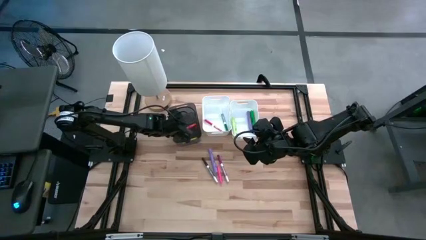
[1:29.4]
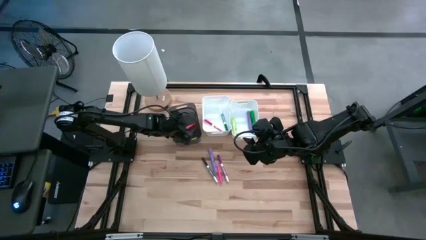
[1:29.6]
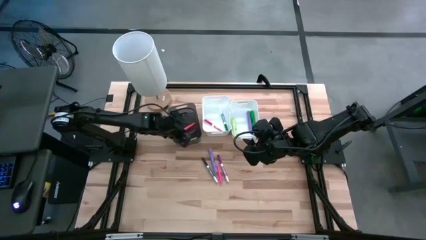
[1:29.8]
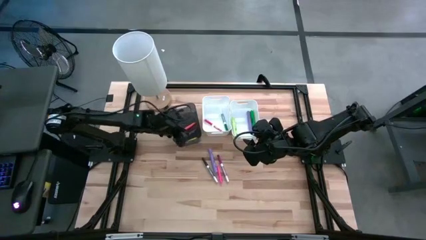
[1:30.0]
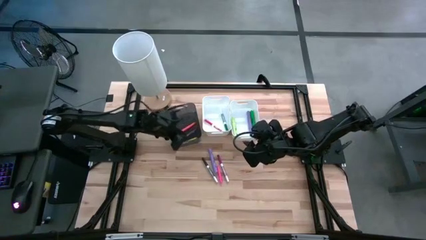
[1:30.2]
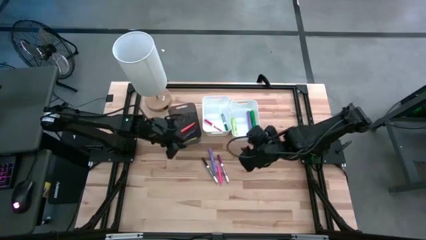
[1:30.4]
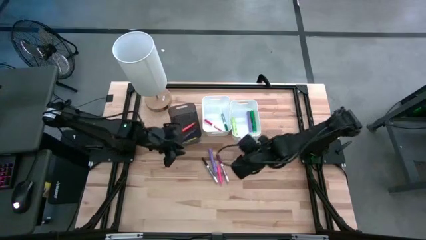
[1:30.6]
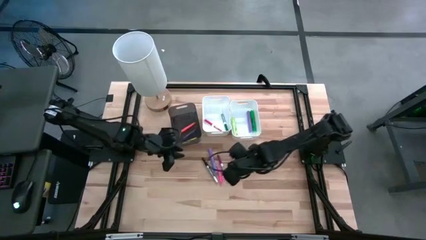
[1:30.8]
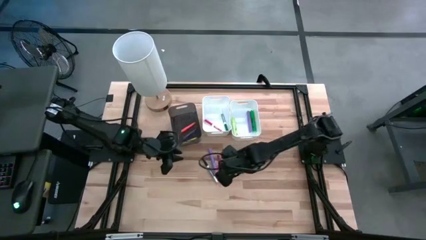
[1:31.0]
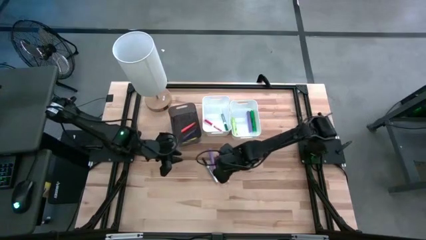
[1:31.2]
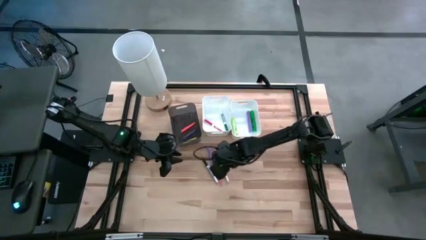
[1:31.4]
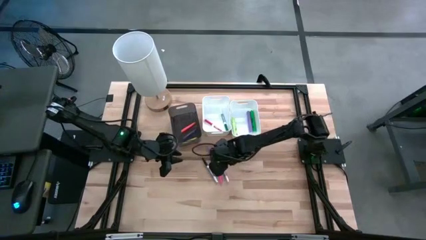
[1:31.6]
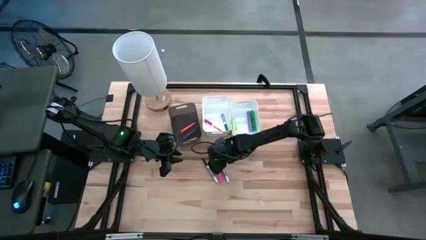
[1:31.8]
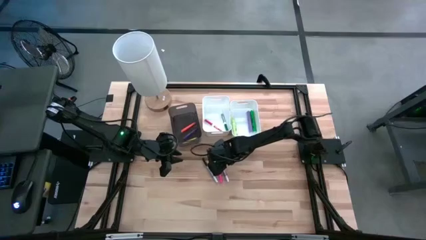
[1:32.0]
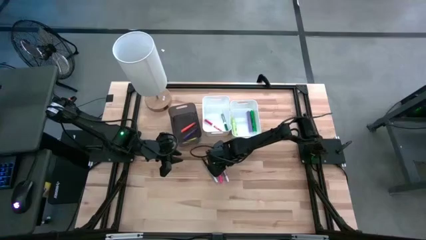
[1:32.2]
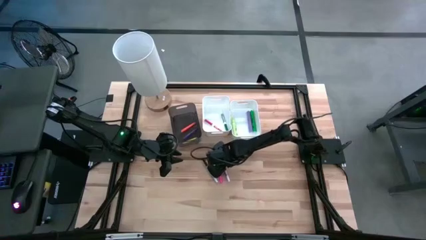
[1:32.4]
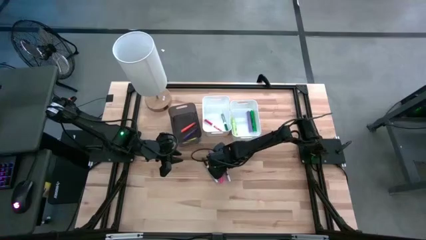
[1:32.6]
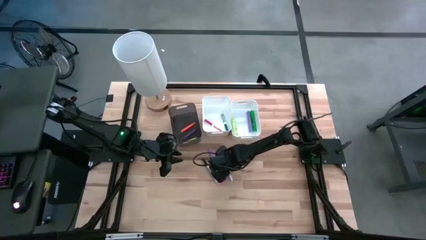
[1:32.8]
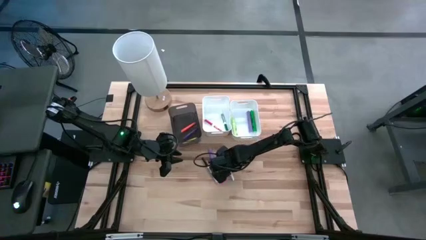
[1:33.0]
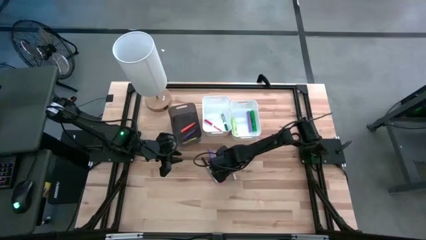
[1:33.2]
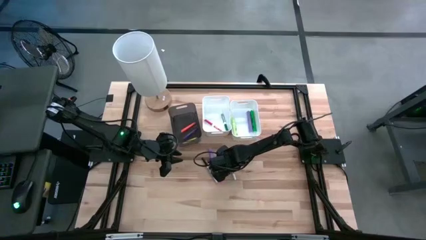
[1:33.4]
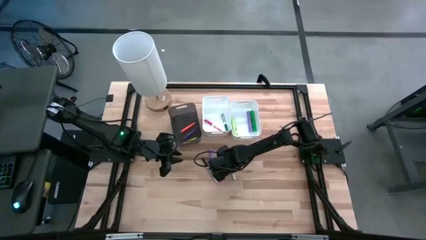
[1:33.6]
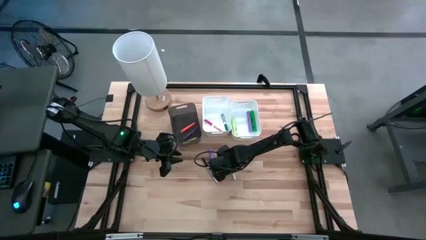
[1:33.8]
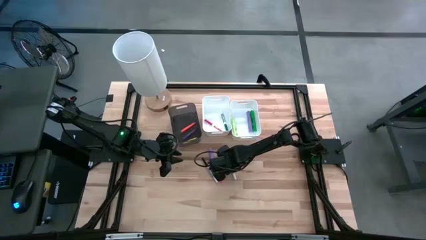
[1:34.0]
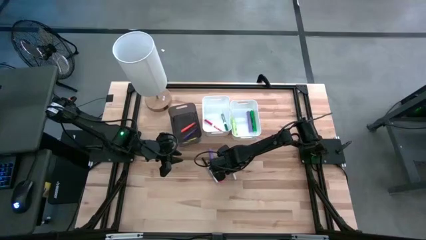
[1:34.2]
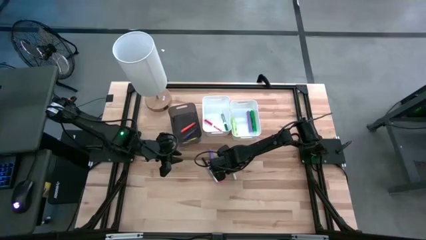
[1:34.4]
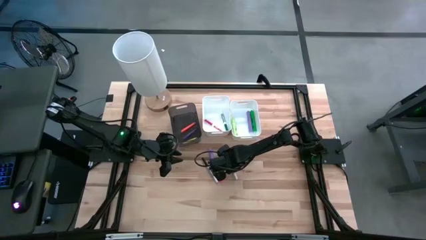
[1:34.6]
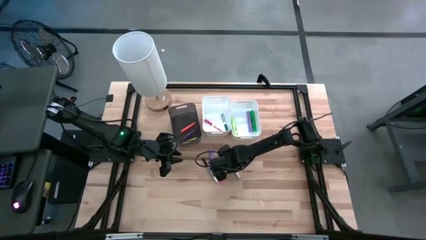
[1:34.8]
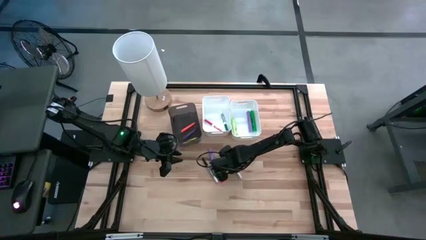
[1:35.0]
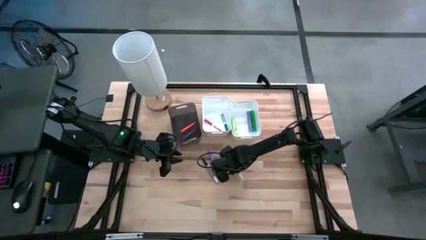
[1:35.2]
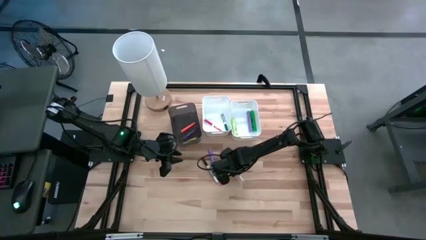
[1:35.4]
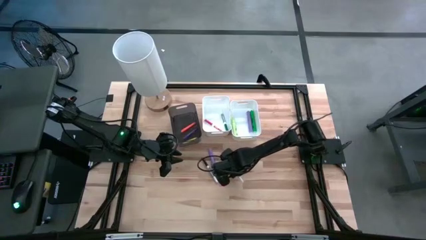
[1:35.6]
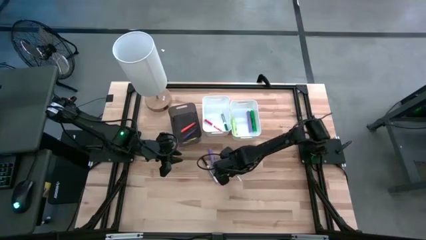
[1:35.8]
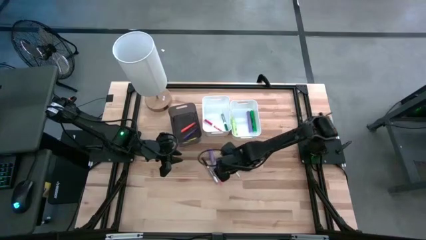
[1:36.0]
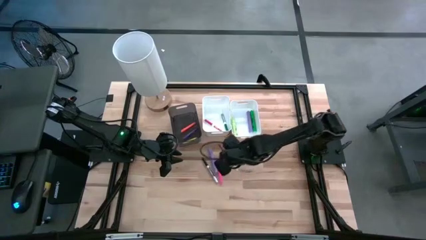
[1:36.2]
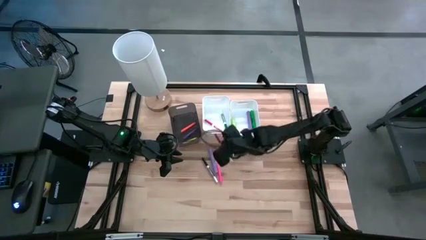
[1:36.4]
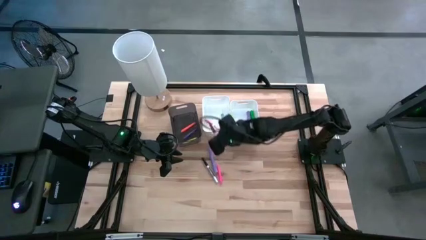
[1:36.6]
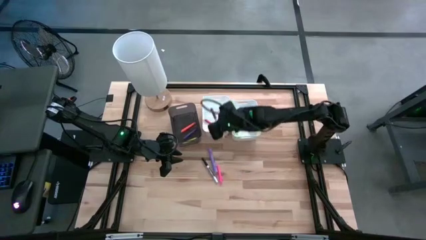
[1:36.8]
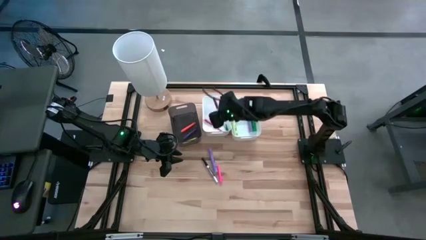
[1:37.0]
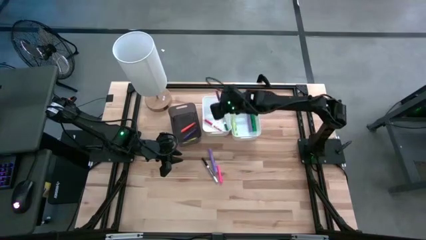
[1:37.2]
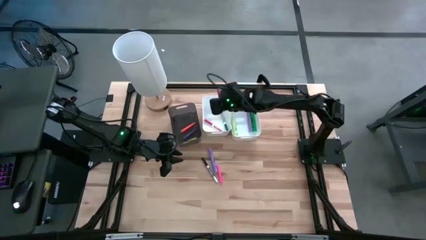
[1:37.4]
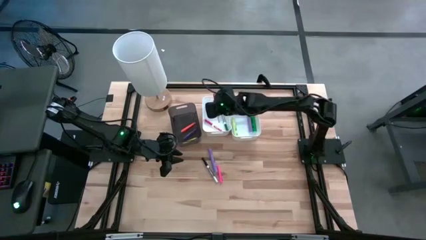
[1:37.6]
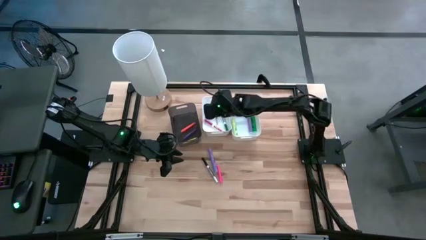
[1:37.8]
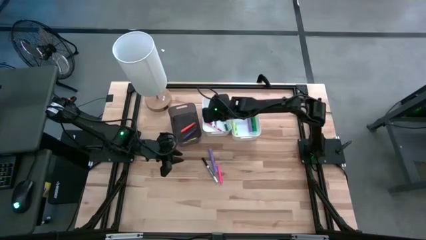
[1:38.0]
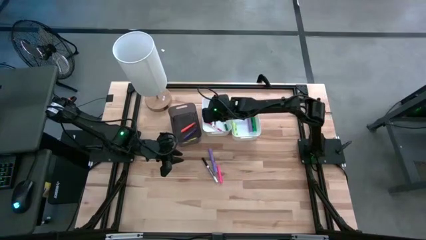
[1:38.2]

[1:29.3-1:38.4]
Task: Pick & Place Markers
Put the dark pink marker pen into the left white bin

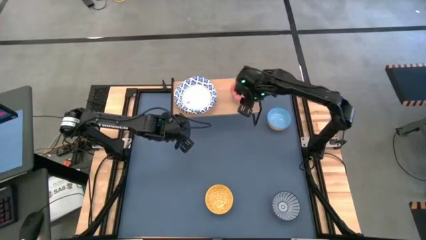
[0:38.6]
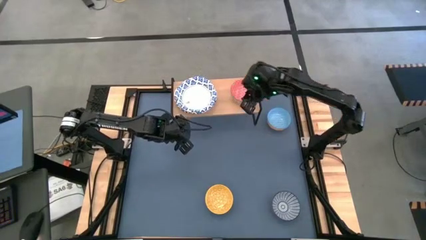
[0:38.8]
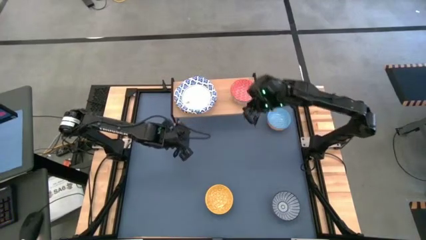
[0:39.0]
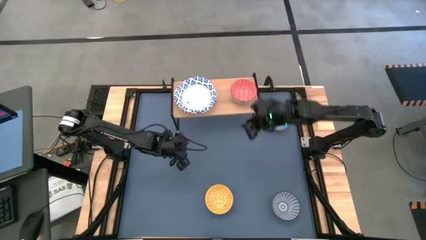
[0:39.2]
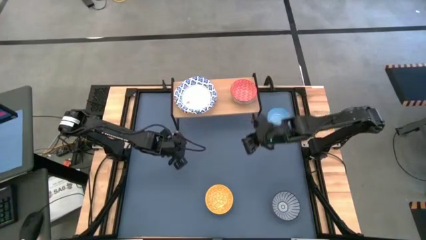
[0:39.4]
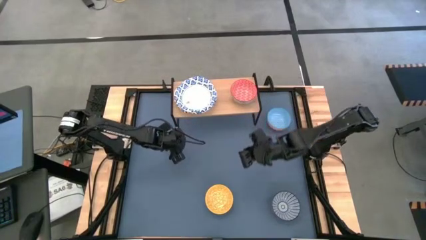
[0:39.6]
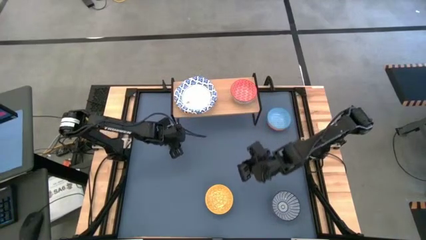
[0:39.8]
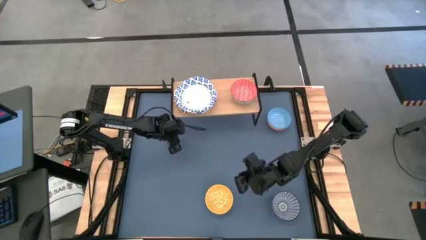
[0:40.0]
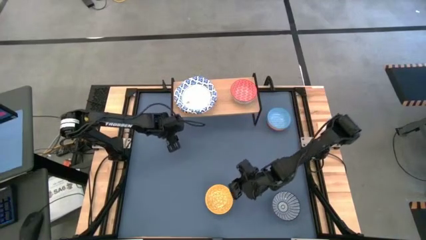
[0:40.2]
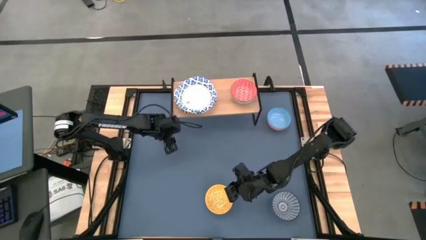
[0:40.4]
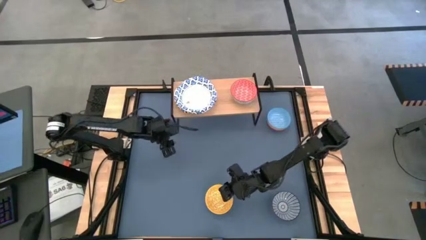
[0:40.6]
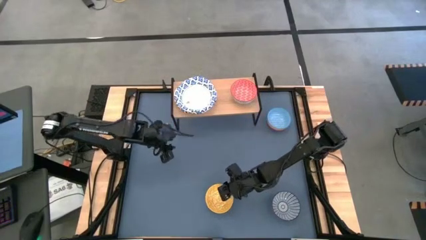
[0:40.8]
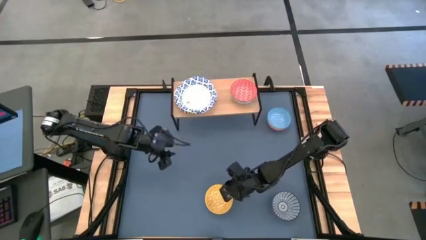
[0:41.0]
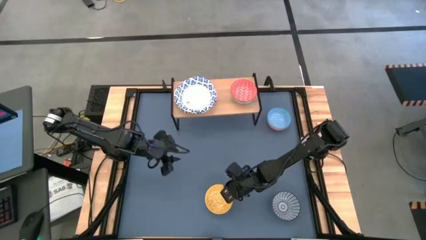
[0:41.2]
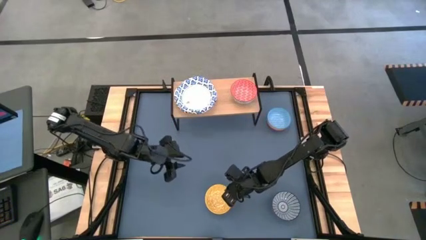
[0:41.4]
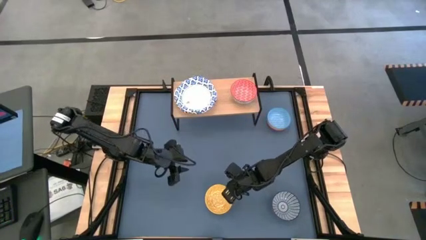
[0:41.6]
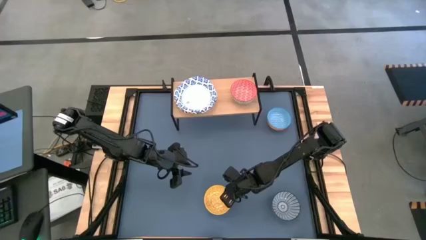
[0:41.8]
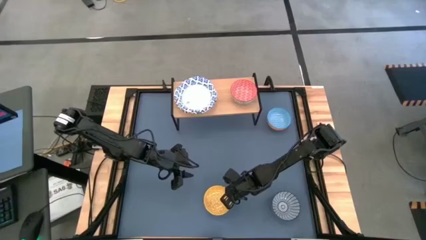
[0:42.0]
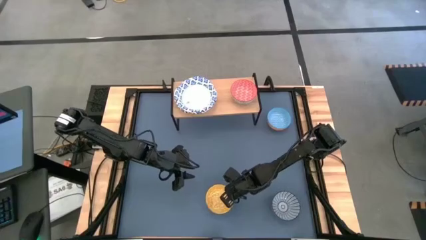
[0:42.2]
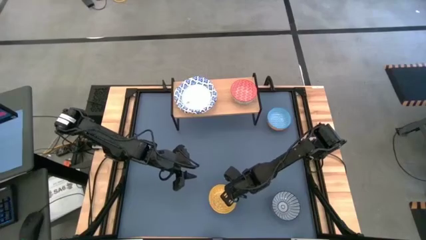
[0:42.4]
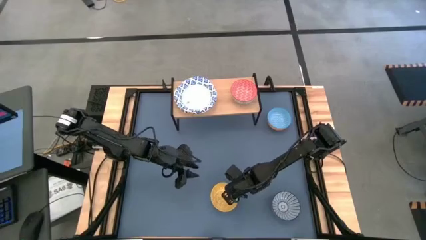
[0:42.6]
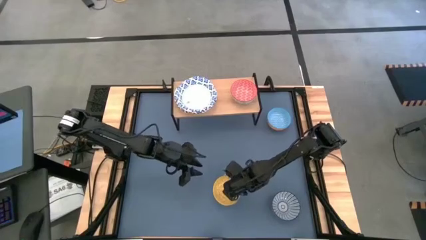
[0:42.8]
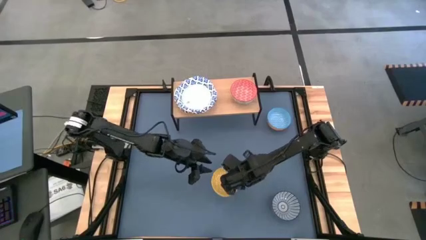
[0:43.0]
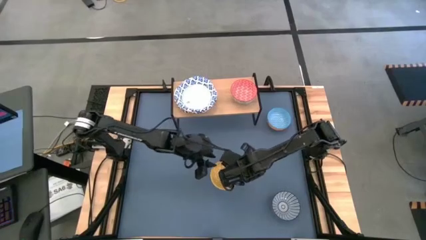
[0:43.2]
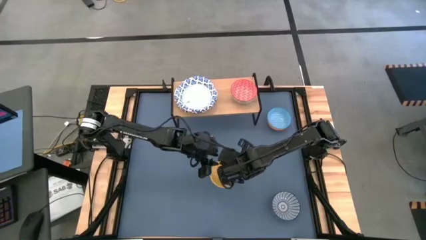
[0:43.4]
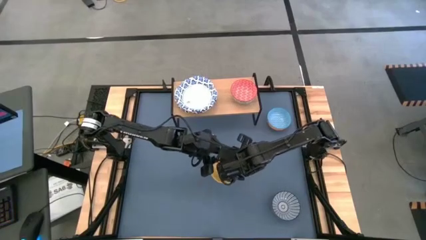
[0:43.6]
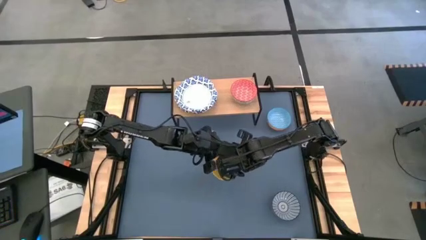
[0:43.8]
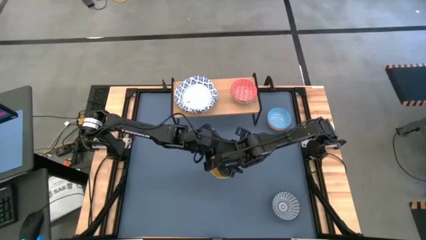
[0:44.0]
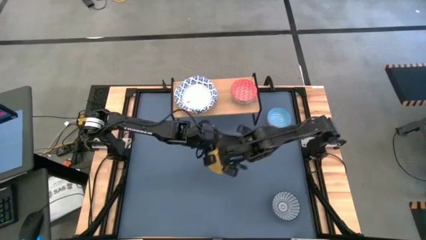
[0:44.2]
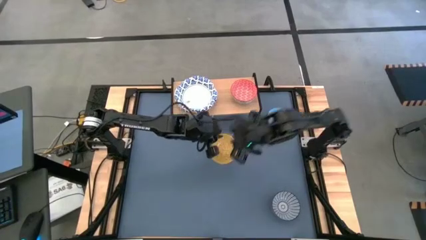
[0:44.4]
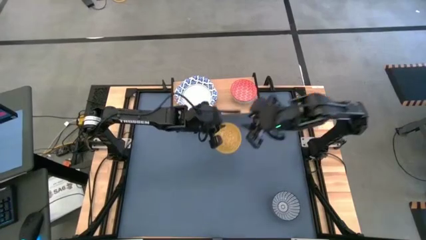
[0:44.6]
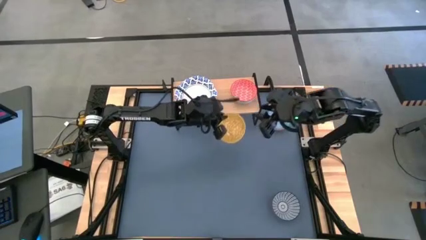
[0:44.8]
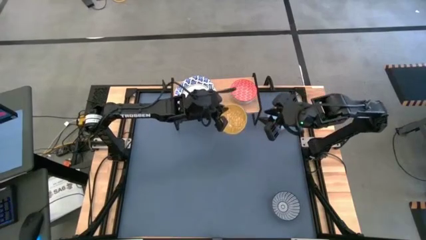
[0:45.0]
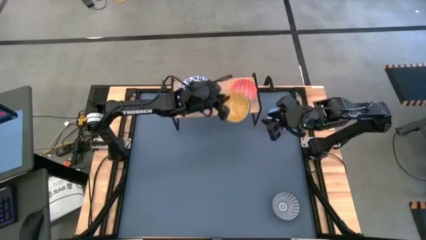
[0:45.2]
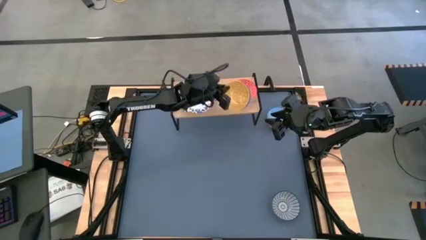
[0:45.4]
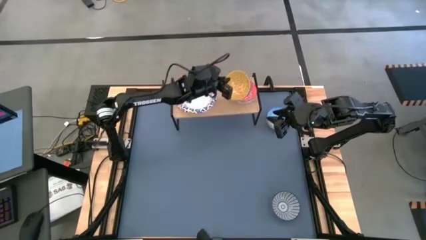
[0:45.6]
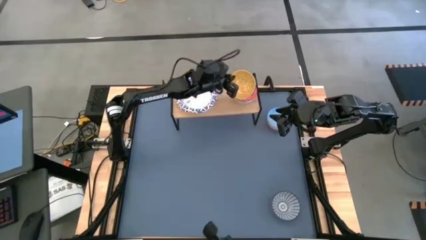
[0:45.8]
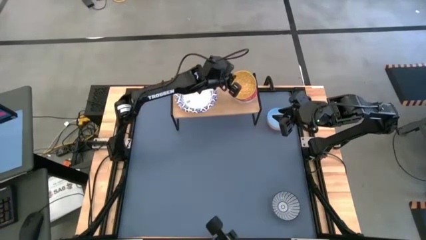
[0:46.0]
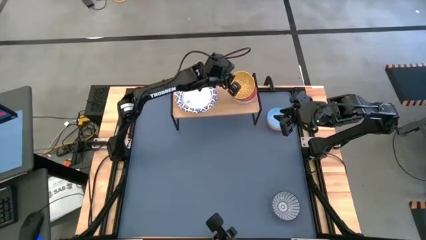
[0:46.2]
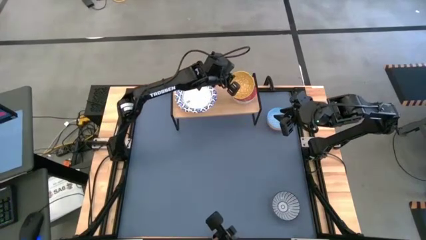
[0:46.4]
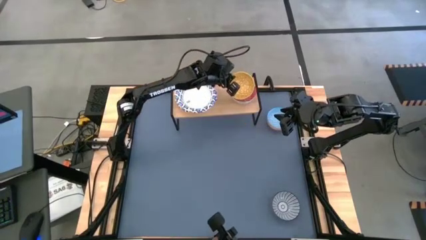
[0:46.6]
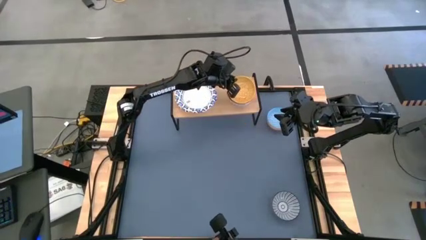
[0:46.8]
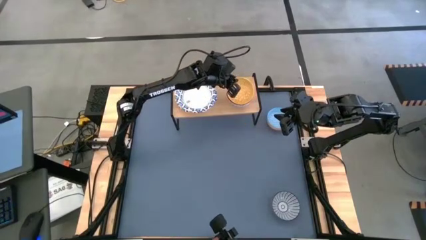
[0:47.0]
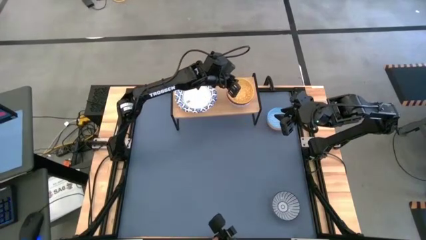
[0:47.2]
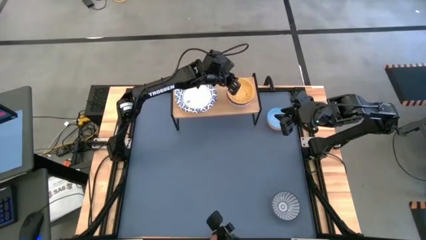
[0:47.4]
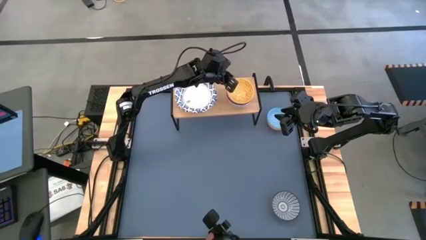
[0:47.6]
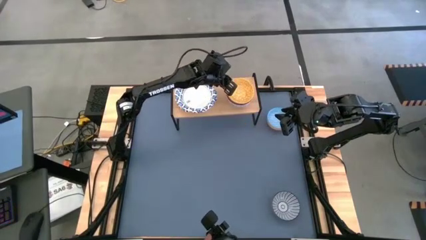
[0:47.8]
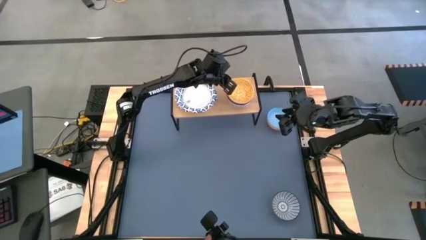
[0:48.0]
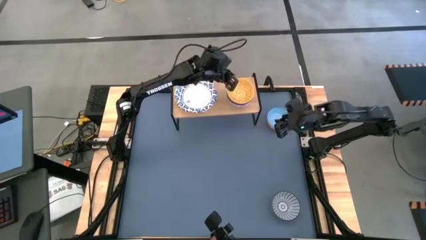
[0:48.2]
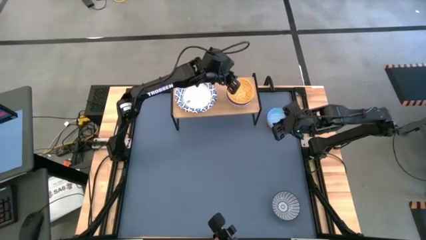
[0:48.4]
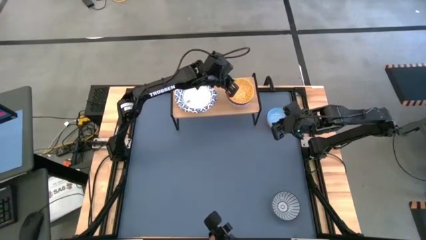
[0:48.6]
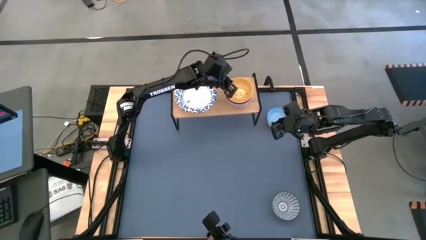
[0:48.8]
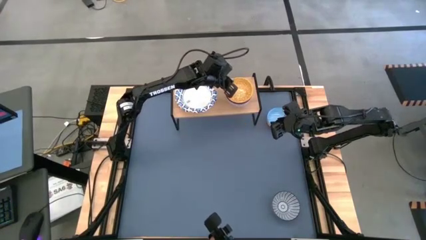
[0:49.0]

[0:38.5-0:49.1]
Task: Place and stack bowls onto a shelf
Stack the yellow bowl on top of the red bowl on the shelf
